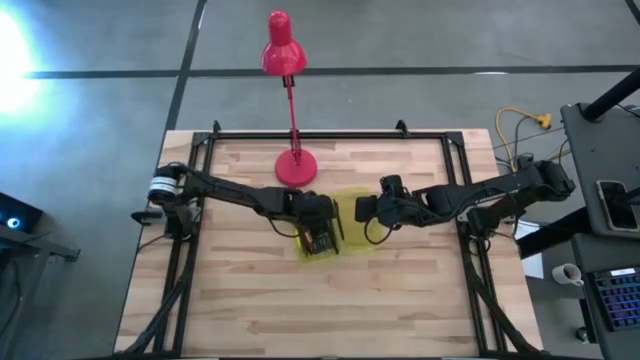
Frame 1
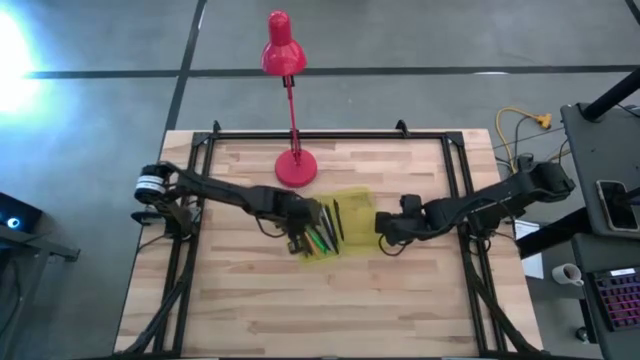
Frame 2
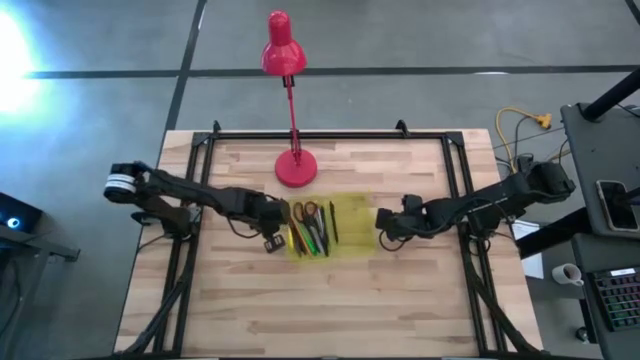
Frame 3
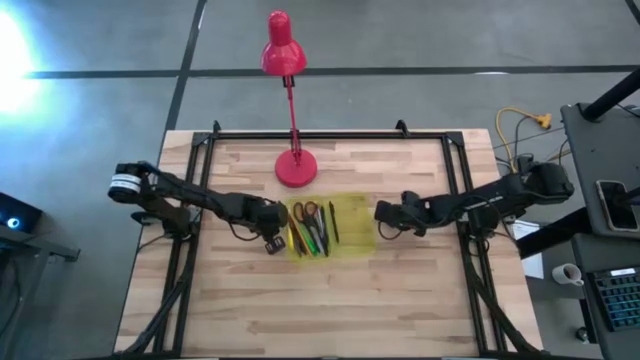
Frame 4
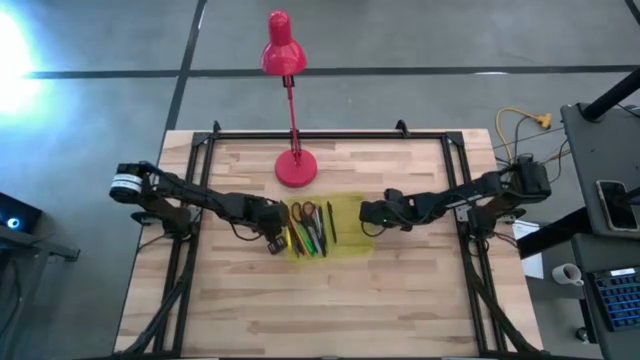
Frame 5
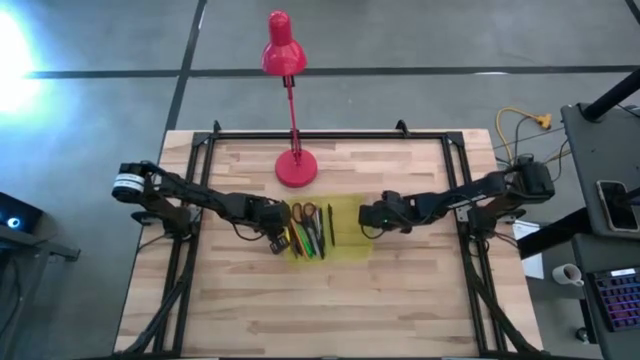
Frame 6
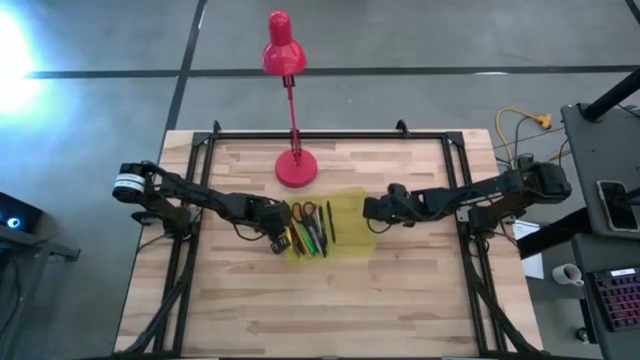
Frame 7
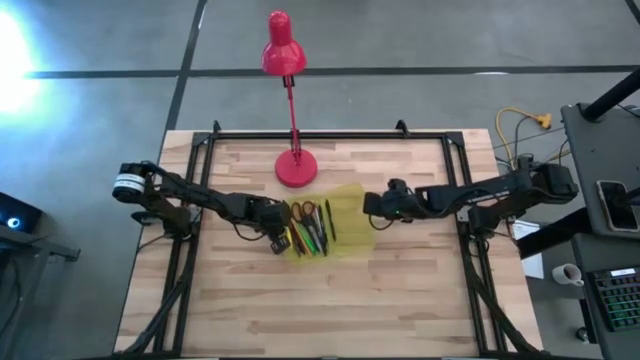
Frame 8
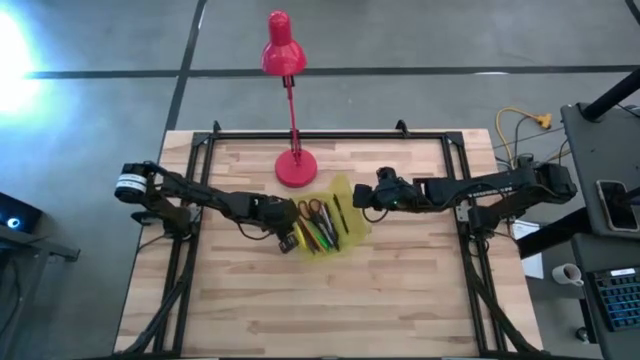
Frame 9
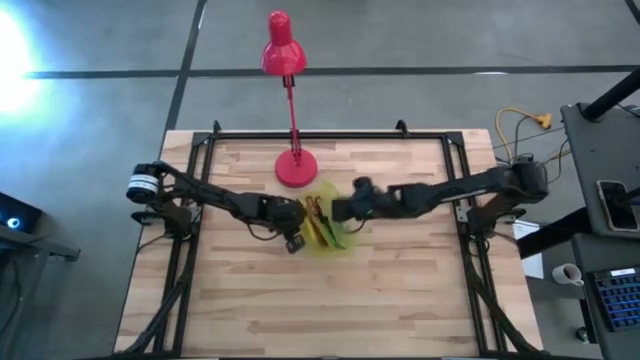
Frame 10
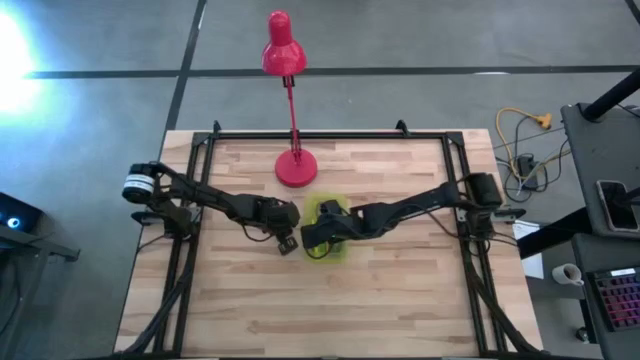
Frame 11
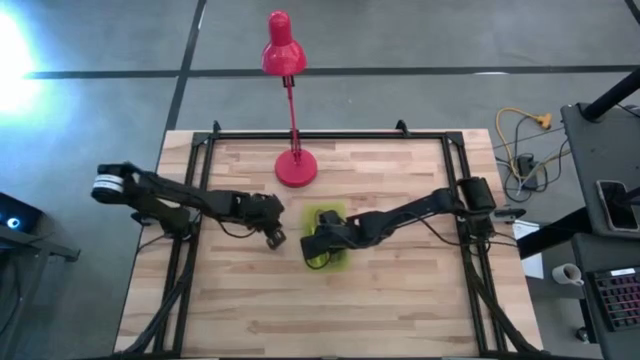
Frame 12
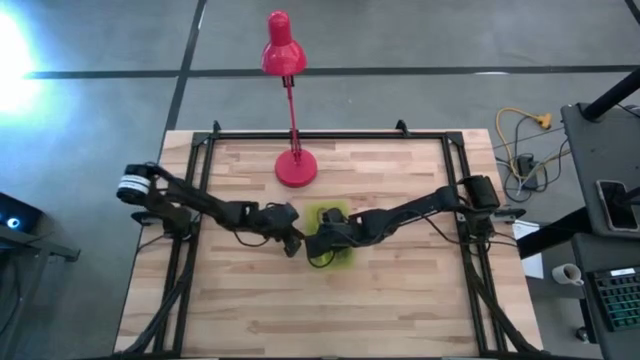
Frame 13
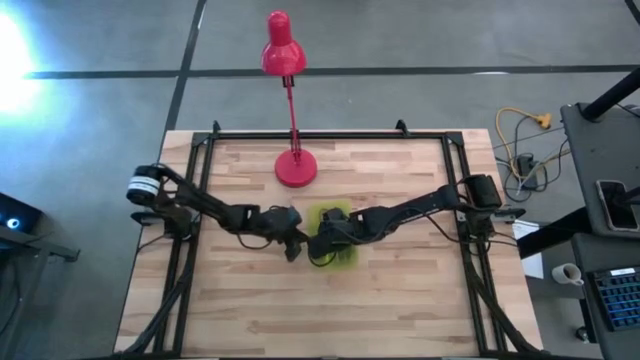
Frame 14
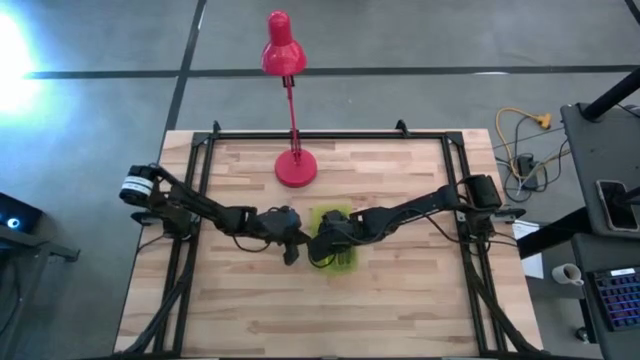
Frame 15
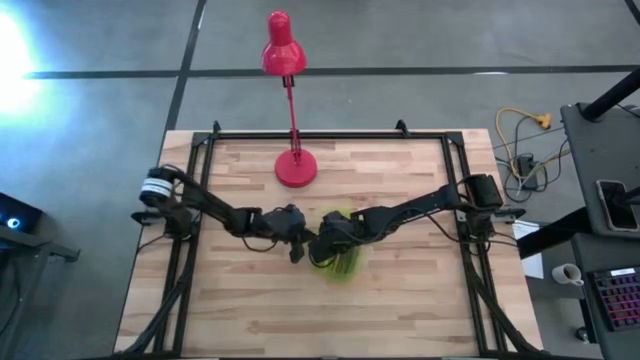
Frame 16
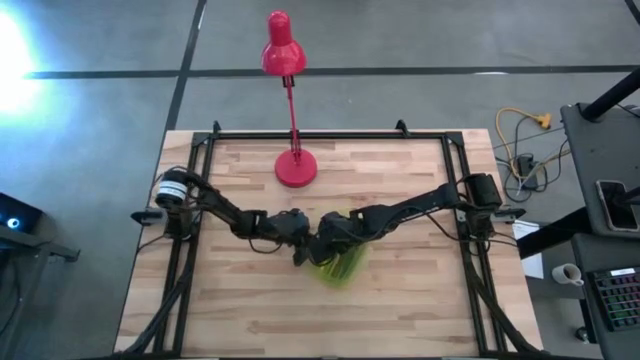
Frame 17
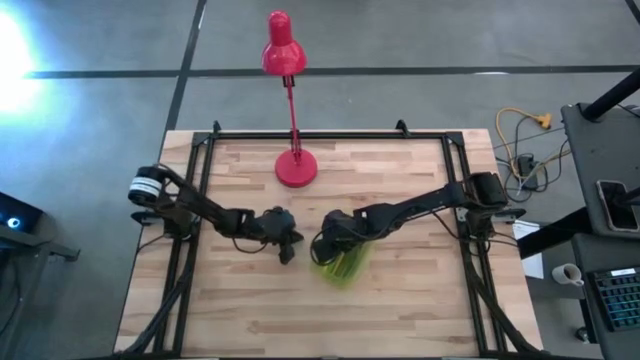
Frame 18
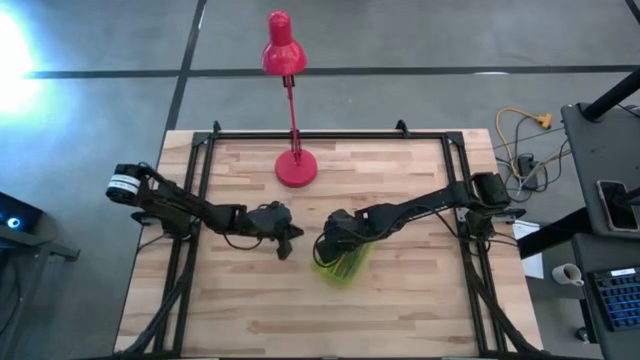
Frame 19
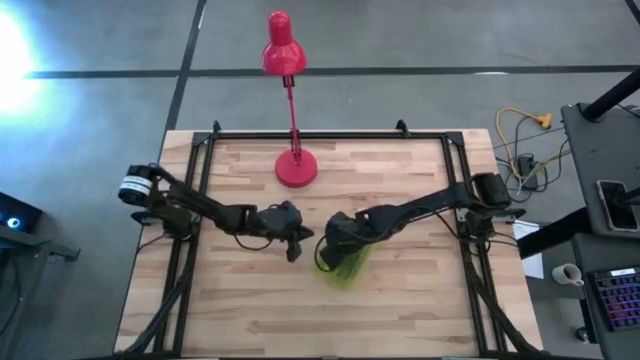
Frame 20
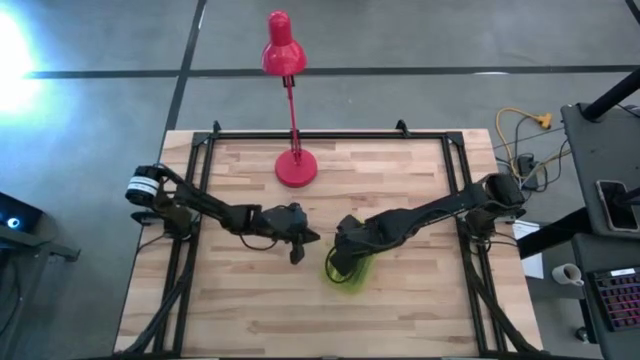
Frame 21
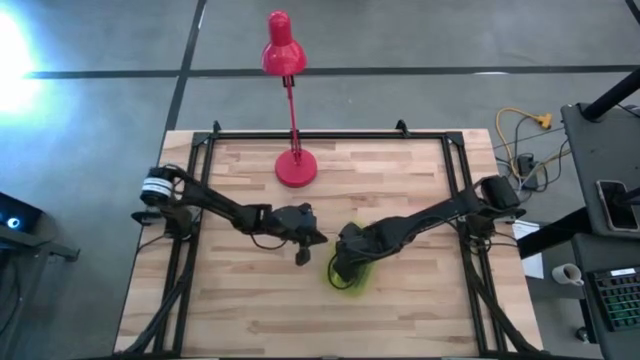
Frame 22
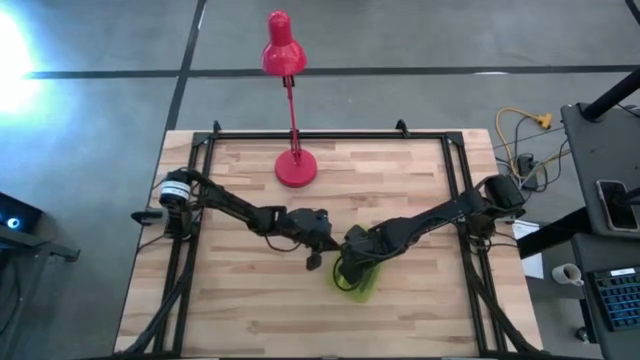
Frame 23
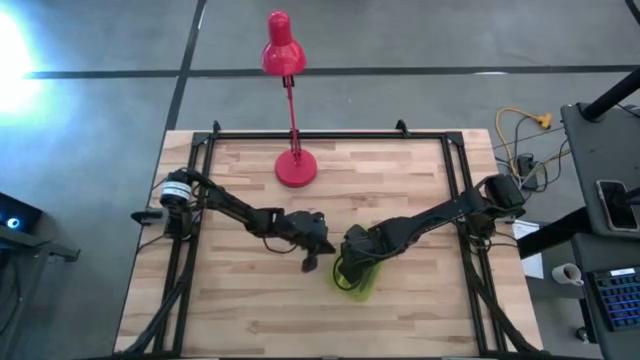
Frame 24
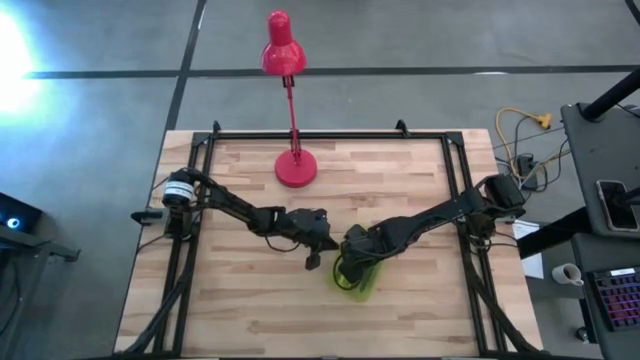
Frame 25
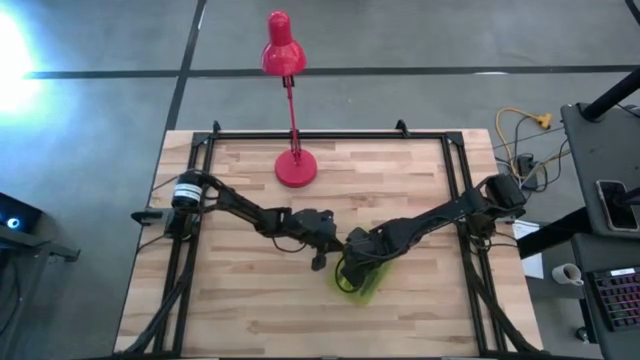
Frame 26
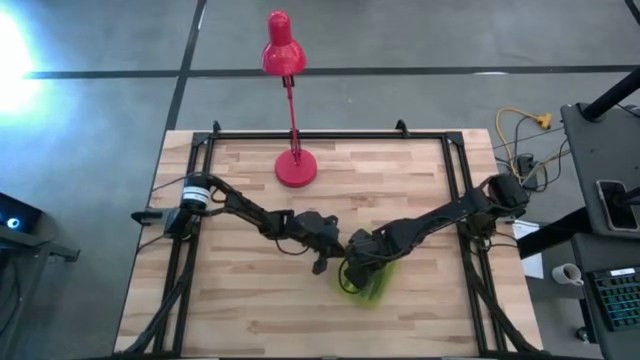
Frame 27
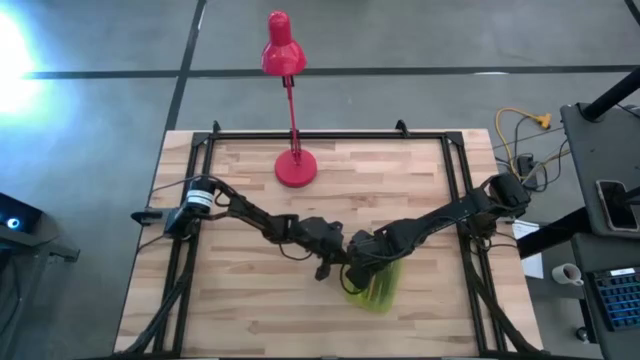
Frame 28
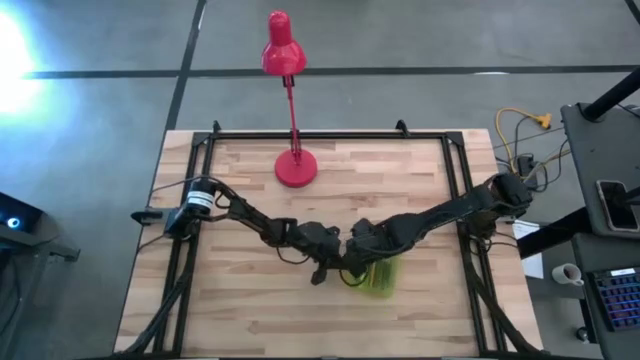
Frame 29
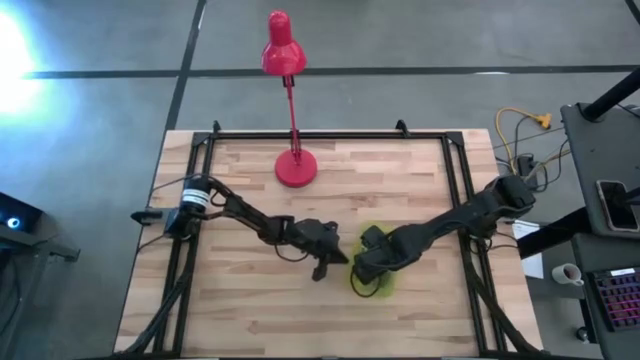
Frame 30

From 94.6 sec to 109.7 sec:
Task: Pick & place school supplies into a supply box
Close the yellow supply box

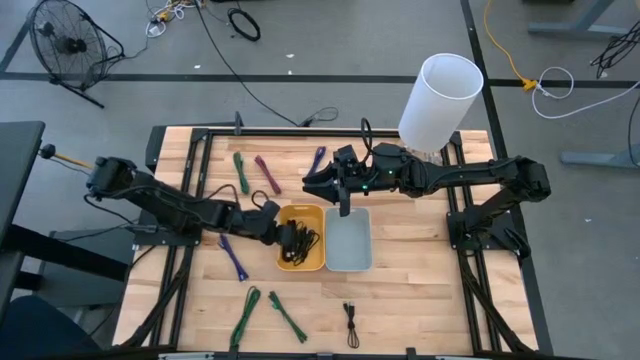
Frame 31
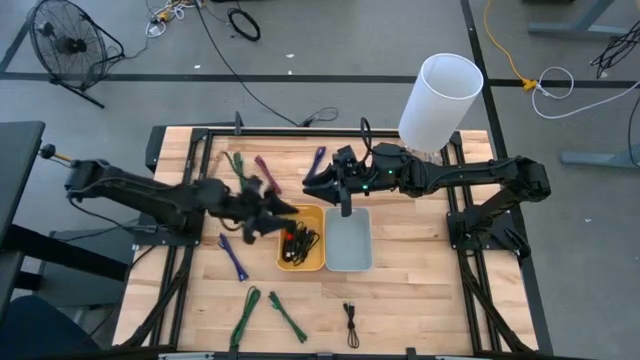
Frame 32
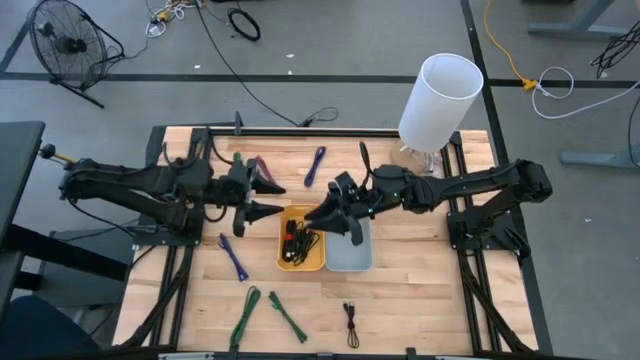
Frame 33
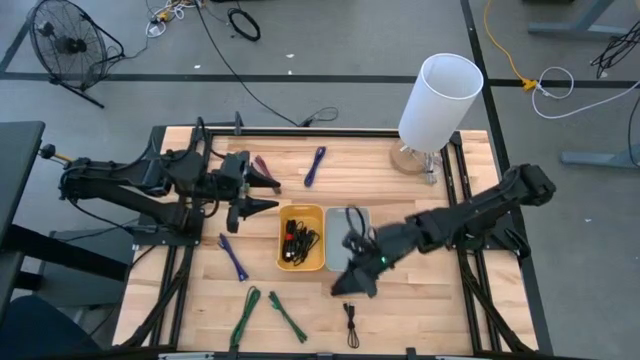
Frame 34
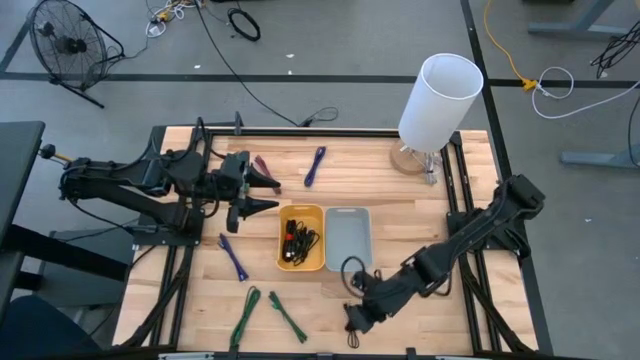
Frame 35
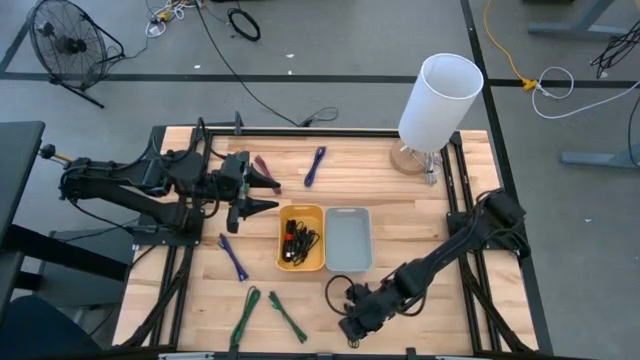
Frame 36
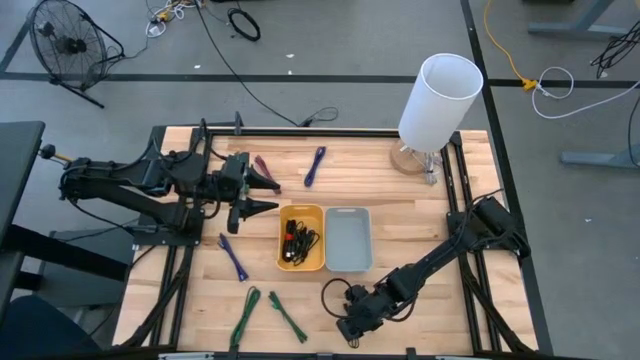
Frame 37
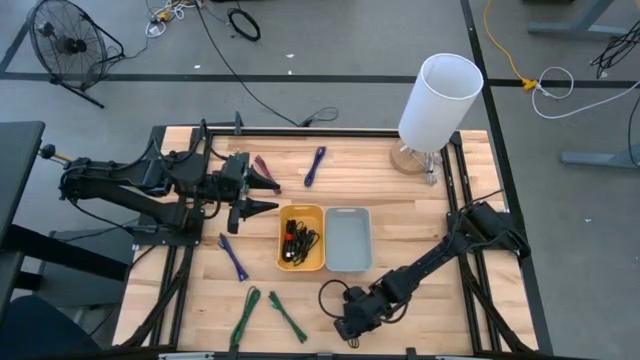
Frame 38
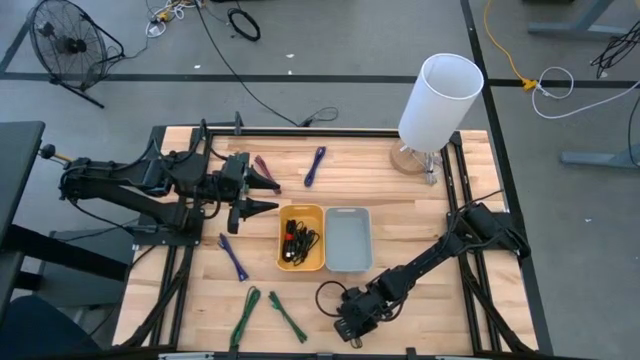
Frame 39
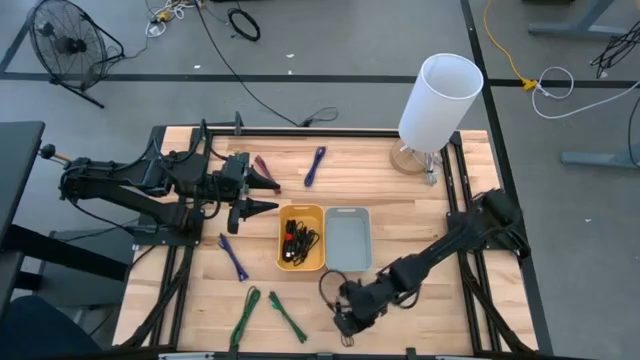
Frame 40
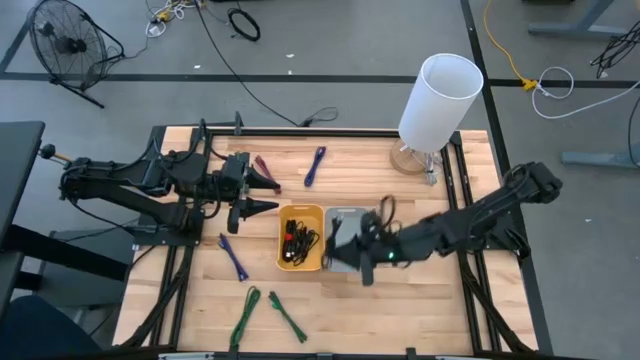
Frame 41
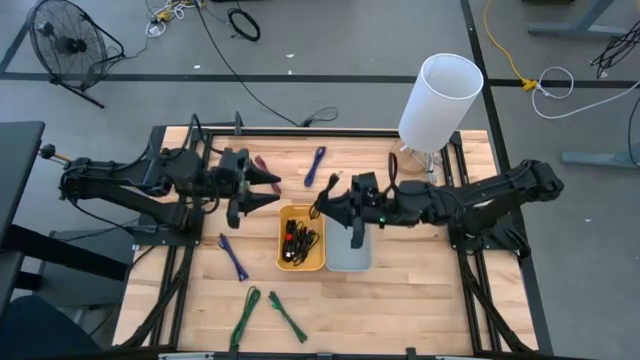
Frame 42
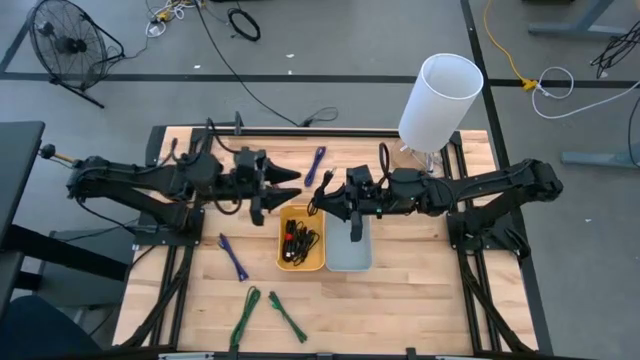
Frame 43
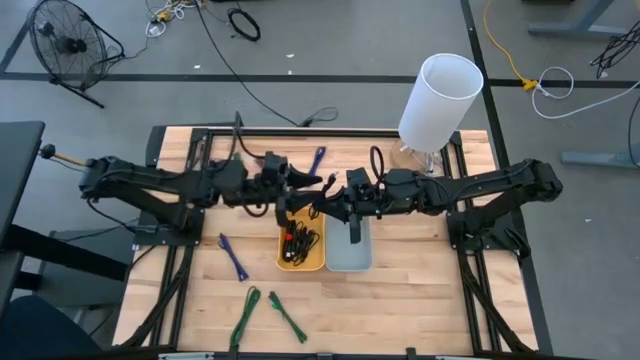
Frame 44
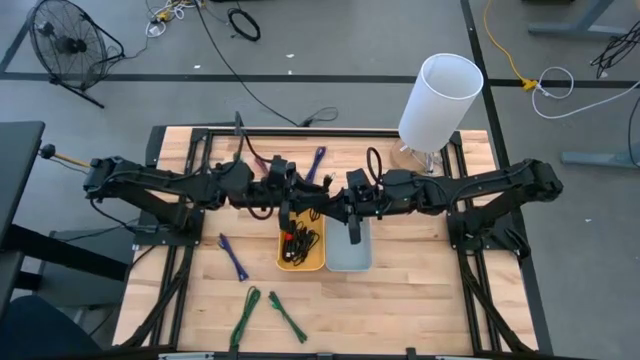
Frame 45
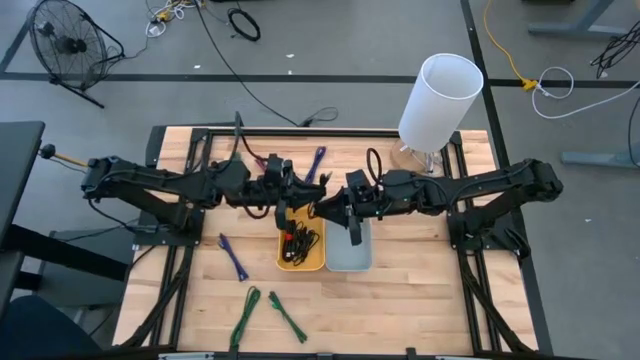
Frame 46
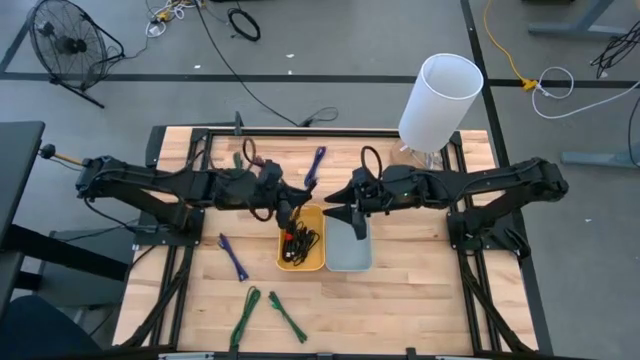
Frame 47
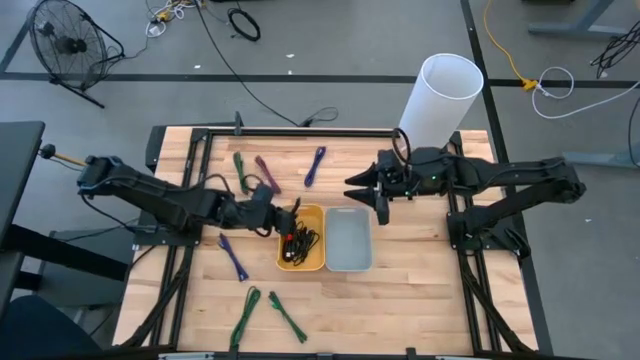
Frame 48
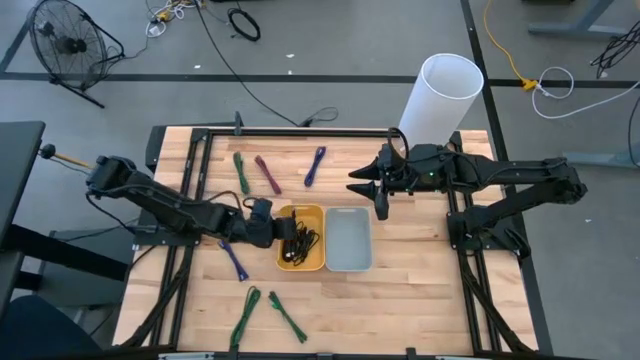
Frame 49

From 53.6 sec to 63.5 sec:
Task: Pick & Place USB Port
Put the black charger cable into the yellow bin
